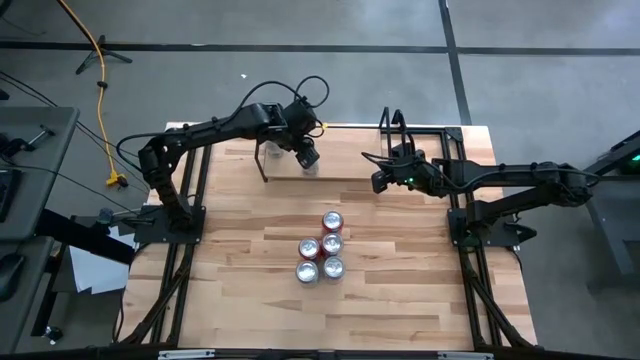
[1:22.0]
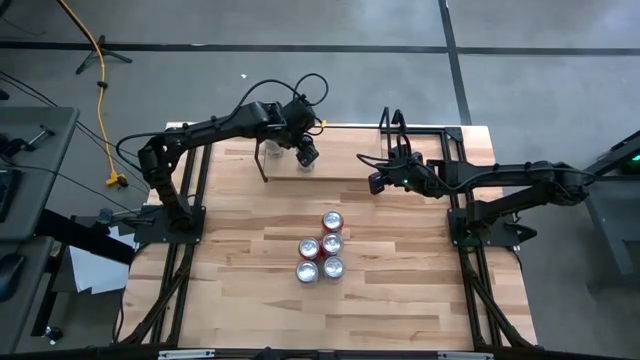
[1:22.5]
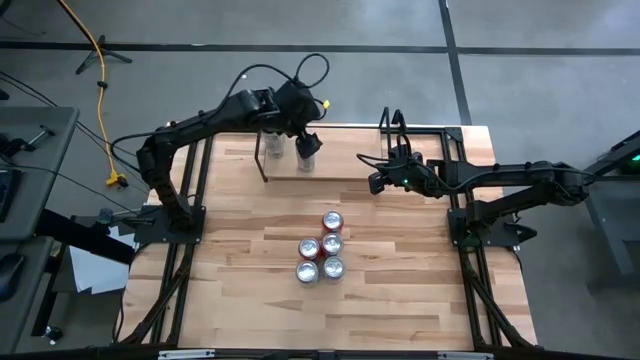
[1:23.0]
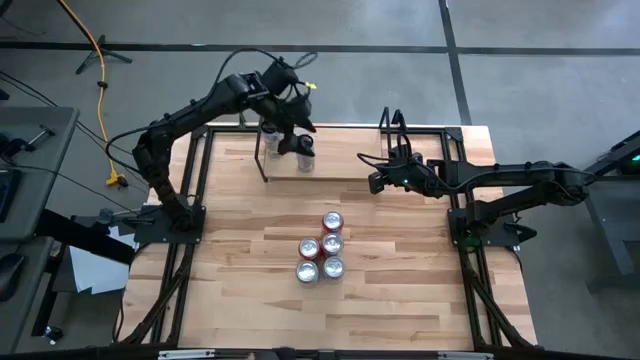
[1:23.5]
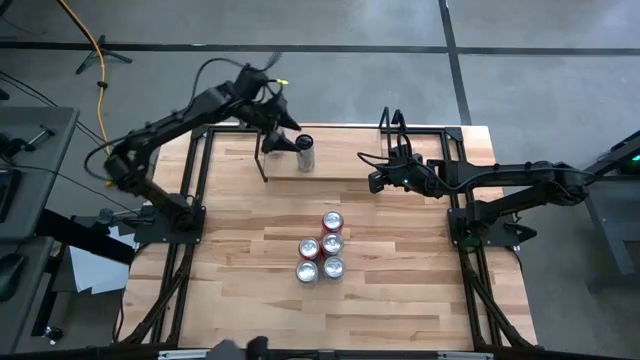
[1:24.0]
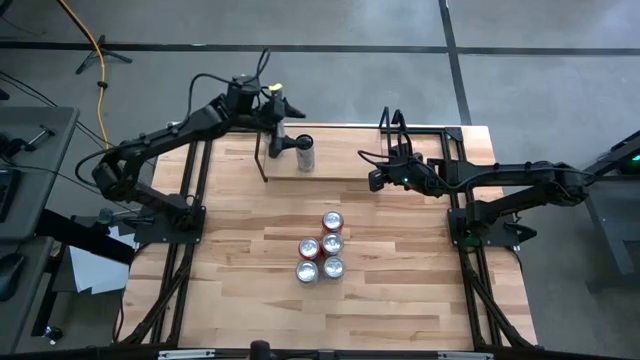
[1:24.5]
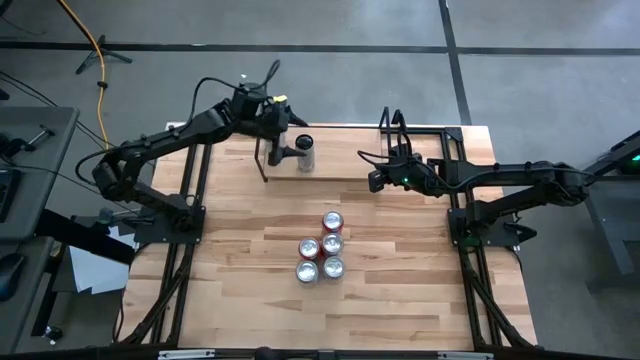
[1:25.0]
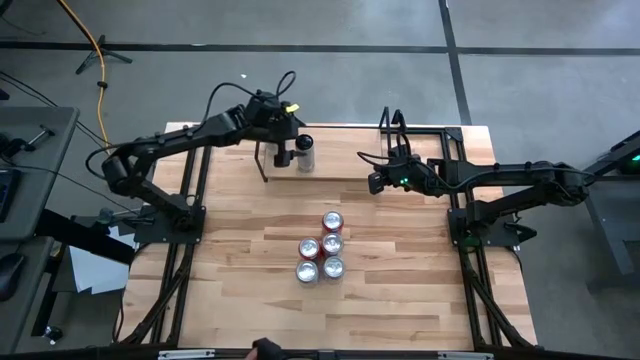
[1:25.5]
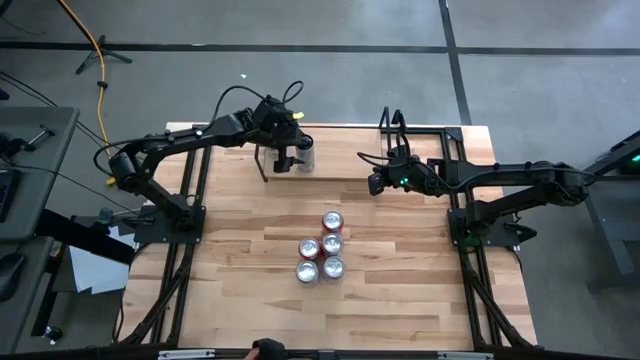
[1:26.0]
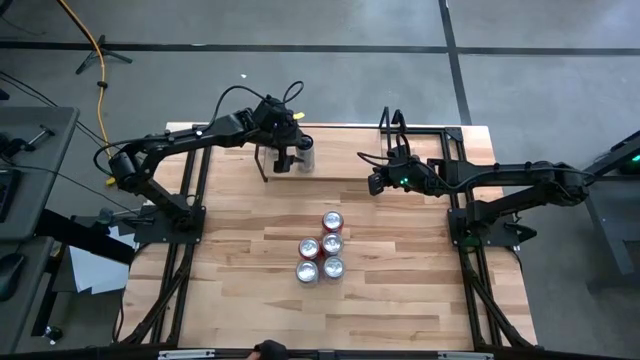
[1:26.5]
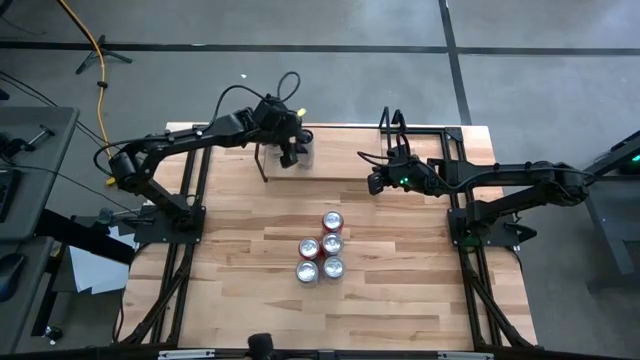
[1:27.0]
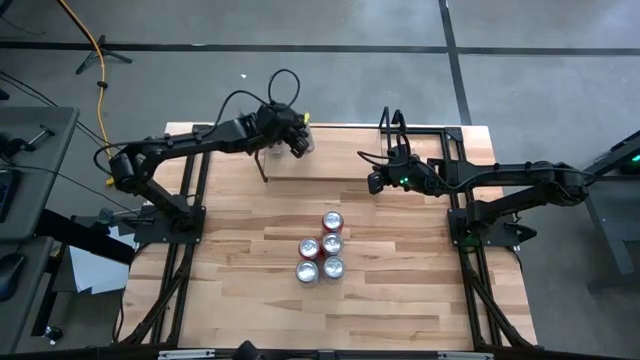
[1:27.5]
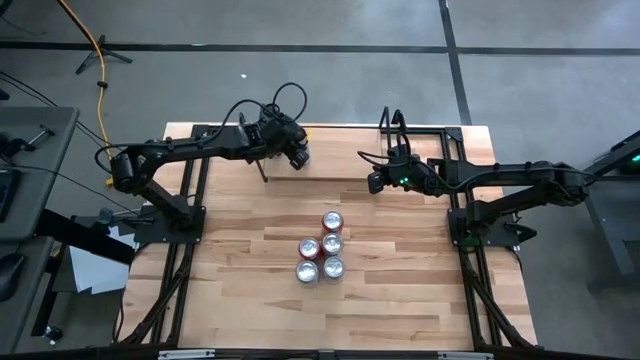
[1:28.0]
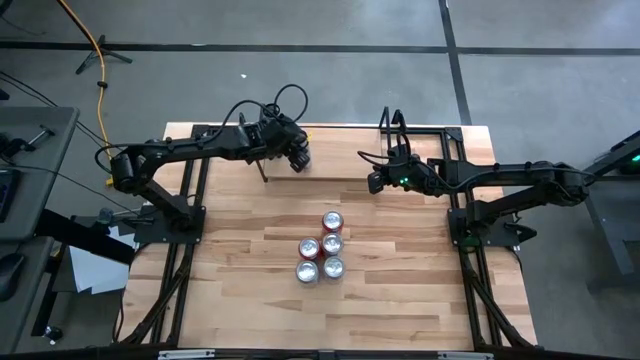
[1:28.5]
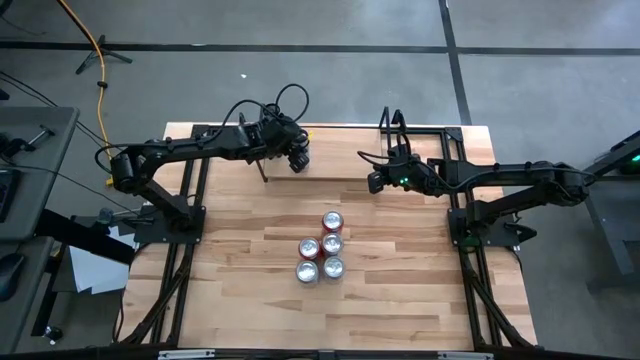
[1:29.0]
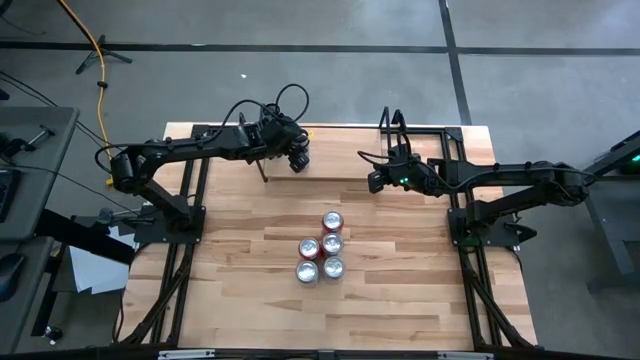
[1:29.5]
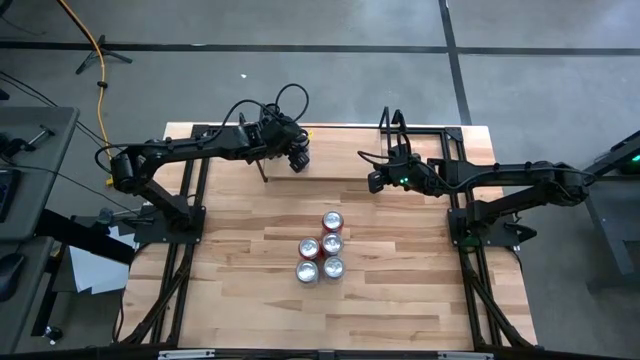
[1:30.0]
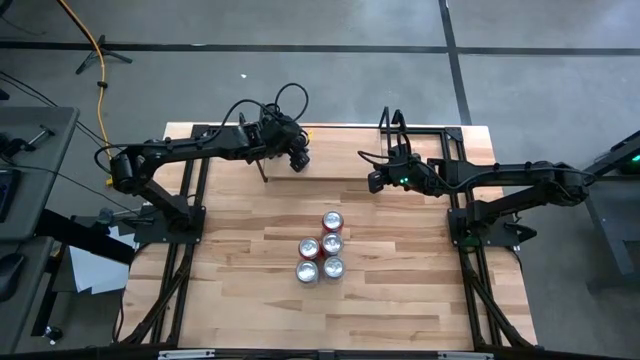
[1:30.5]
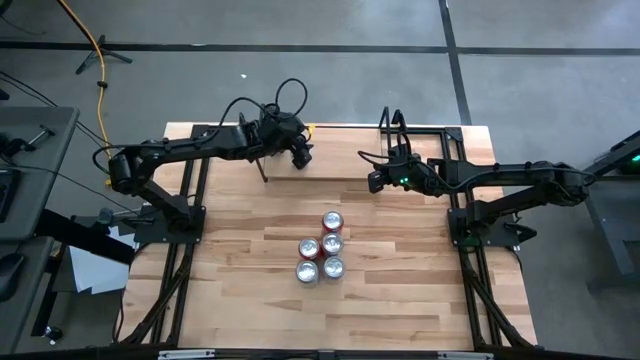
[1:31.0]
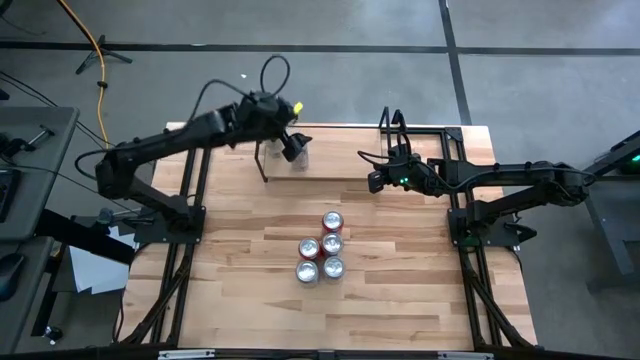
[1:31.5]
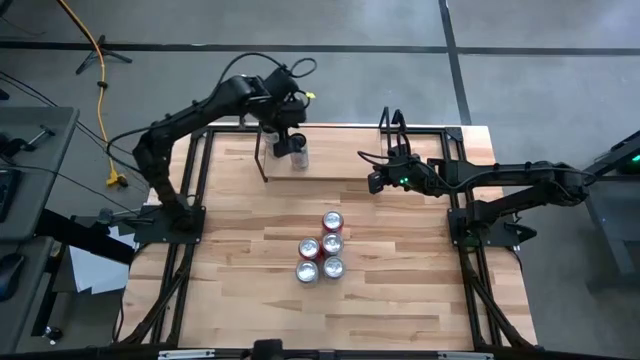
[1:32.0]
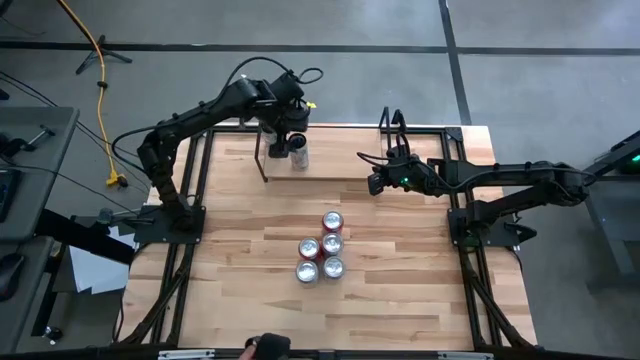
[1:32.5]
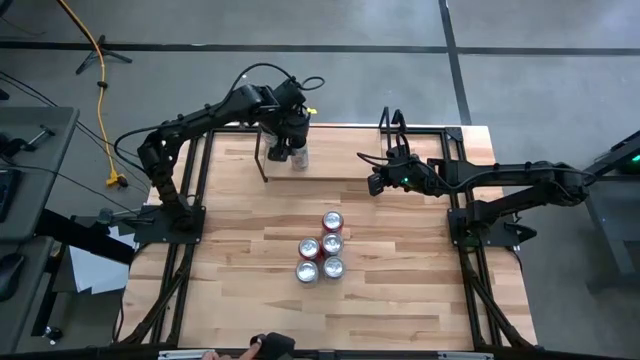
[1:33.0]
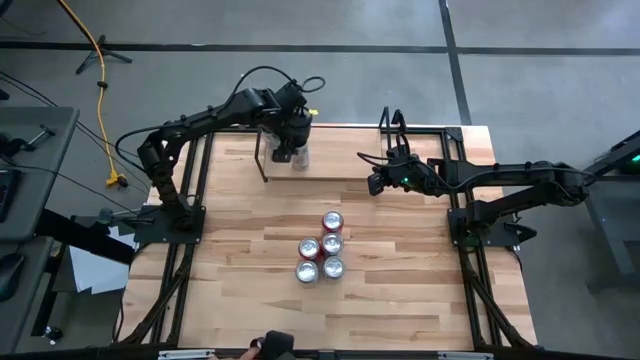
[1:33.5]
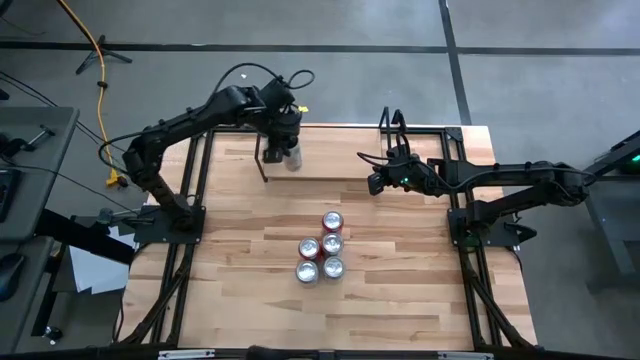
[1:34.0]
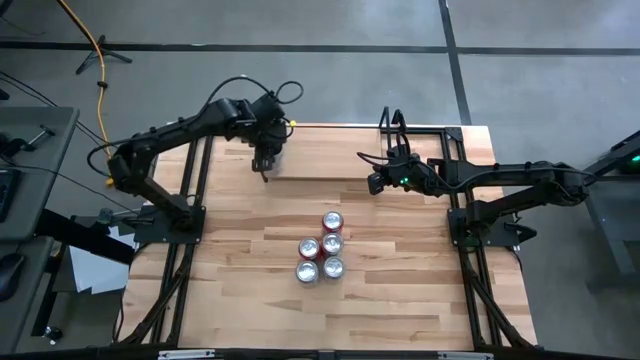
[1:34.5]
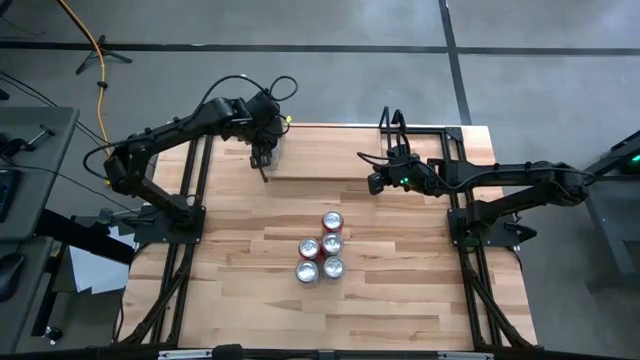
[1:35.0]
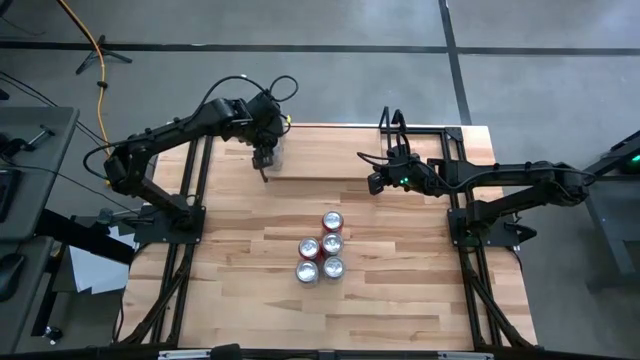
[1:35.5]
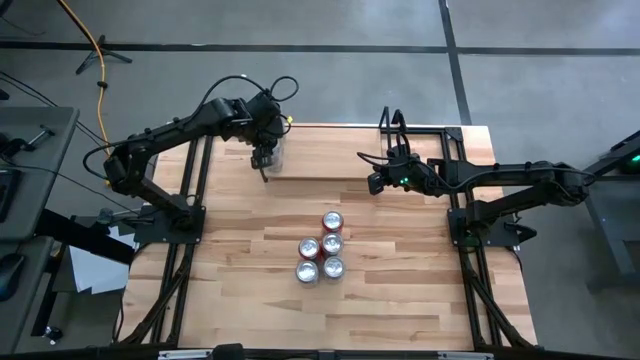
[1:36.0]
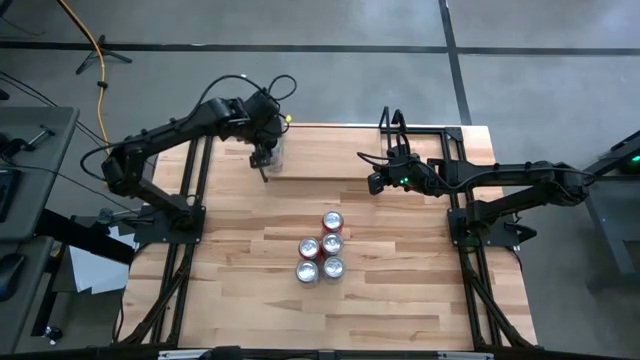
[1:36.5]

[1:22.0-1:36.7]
Task: Place canned beverage on shelf
Put the white soda can aligned with the other white soda can on the shelf

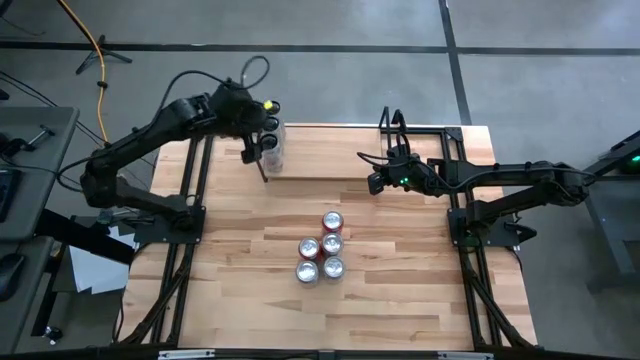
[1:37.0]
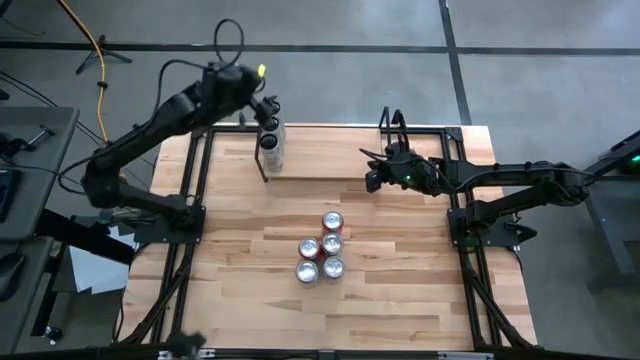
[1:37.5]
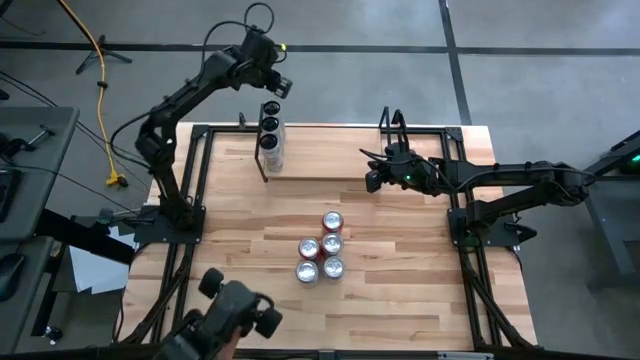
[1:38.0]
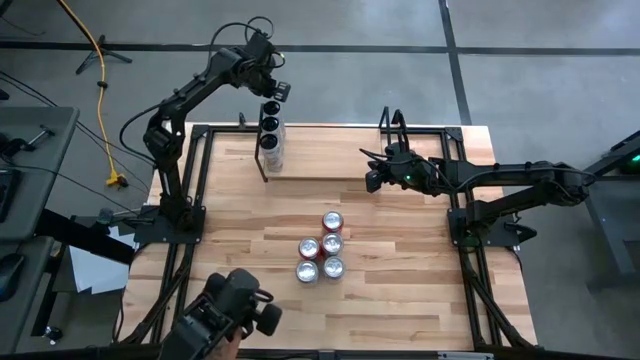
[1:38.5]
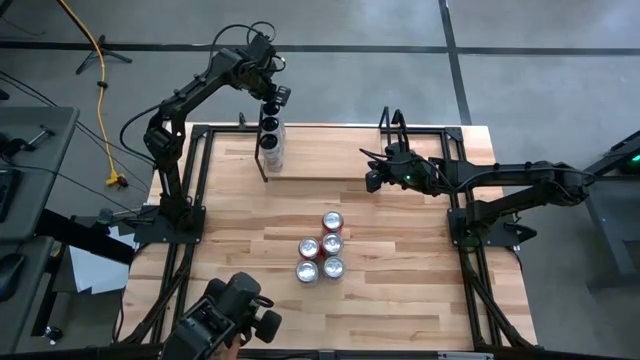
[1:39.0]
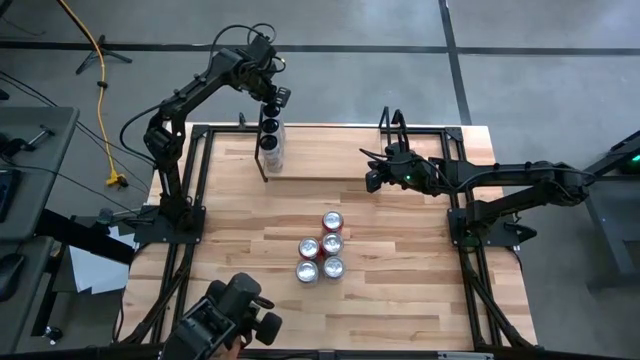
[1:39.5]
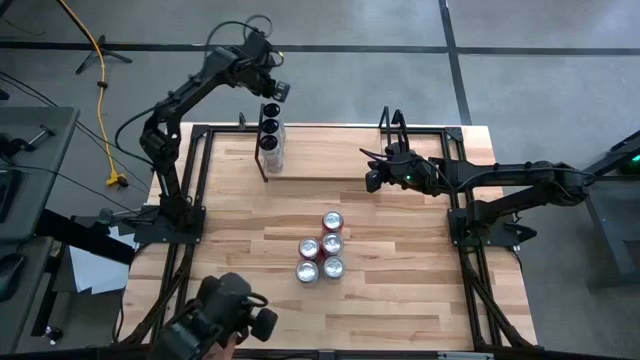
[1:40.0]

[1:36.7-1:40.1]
Adjust the white soda can

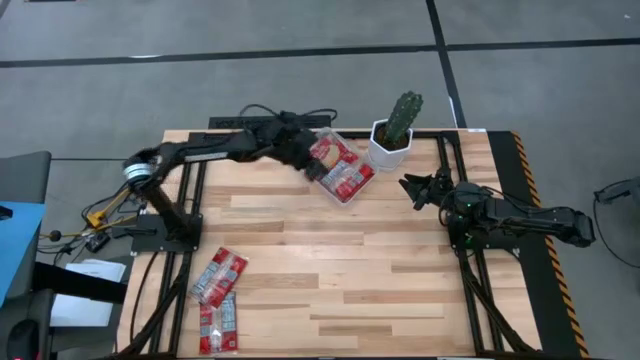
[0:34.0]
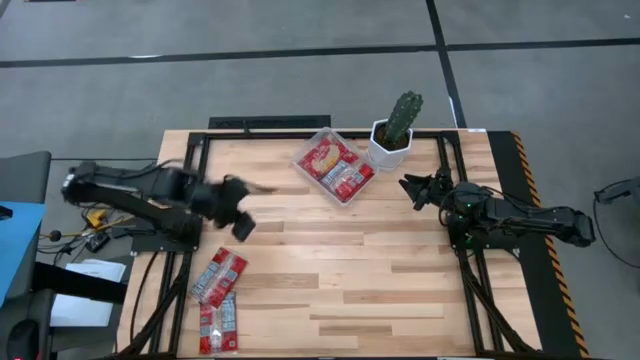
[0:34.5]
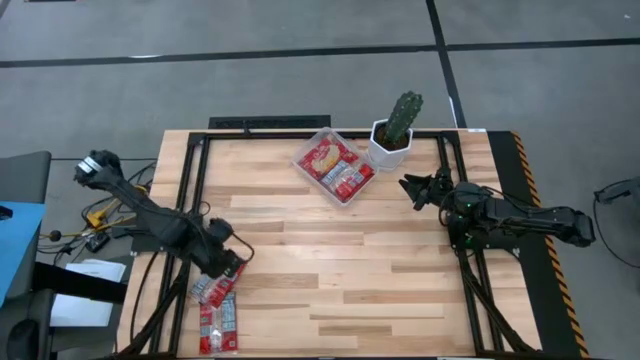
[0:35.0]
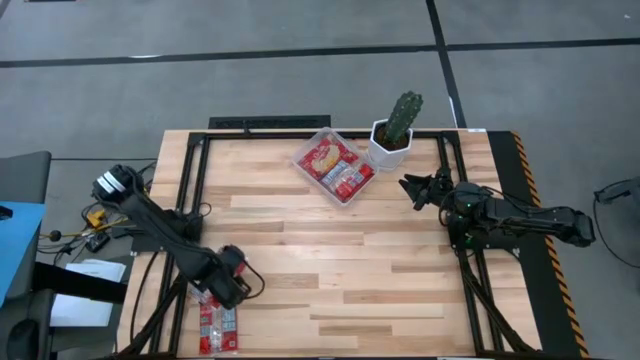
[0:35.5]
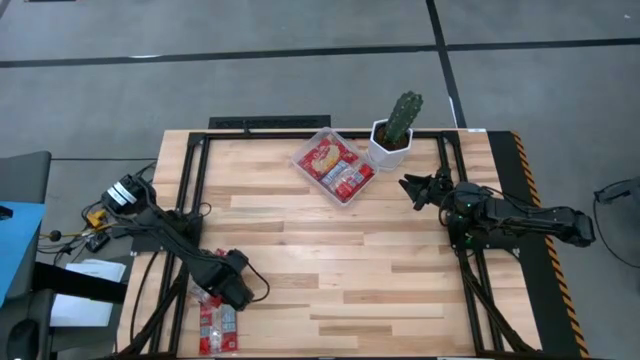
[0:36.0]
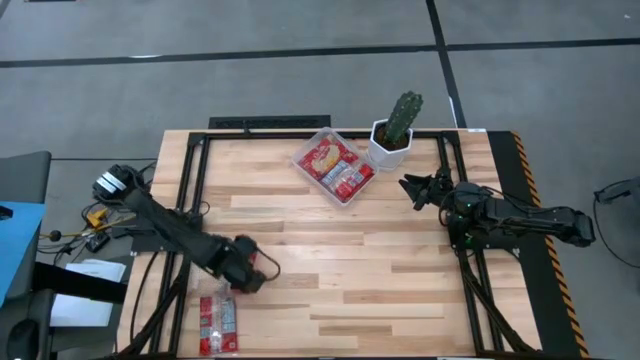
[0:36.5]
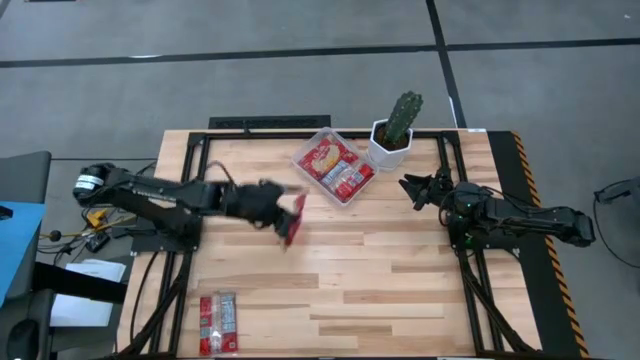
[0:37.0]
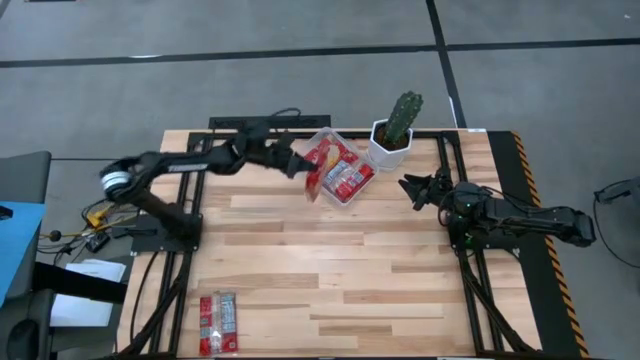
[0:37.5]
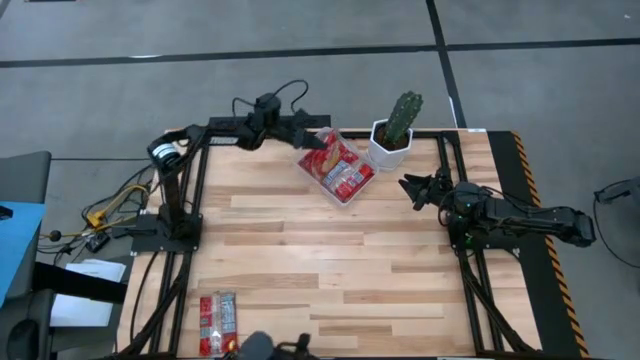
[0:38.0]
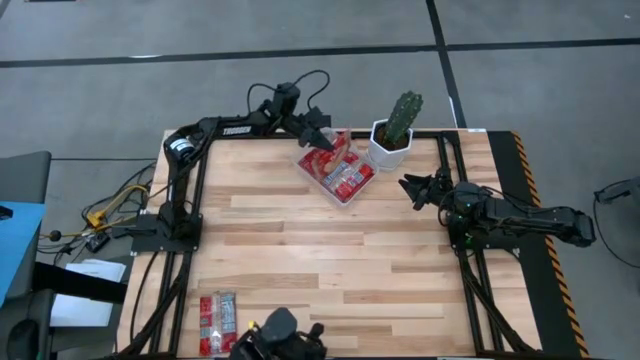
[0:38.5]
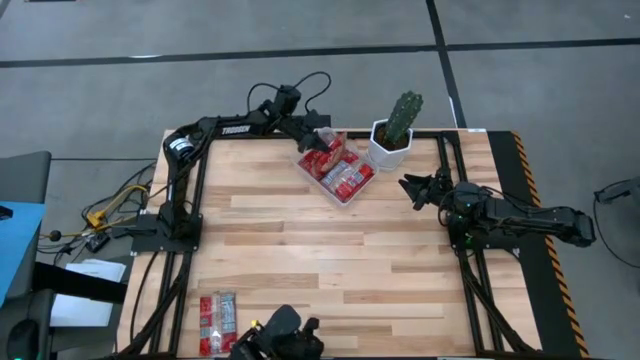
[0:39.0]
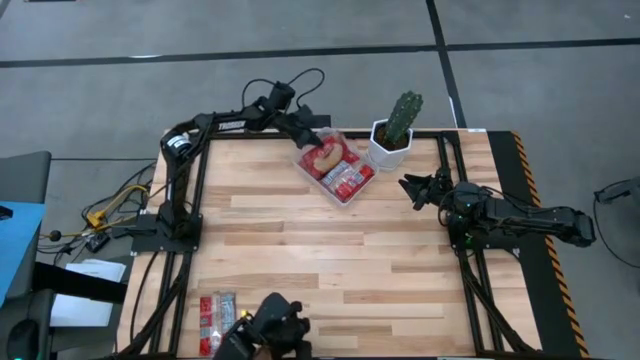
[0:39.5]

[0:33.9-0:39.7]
Task: Sort popcorn bags into baskets
Put the red popcorn bag into the transparent bin
